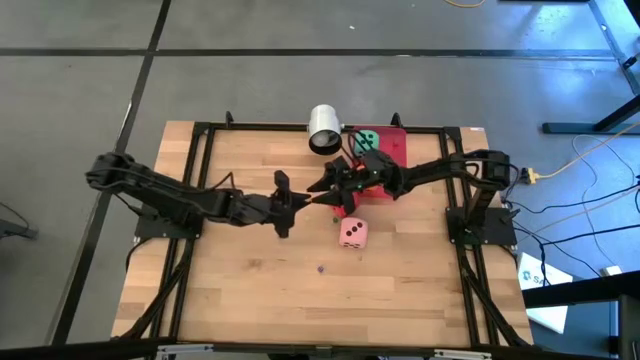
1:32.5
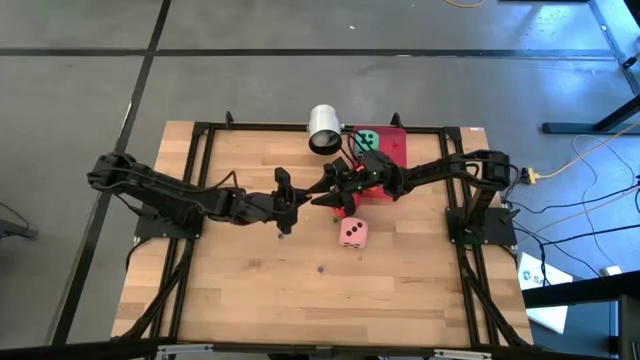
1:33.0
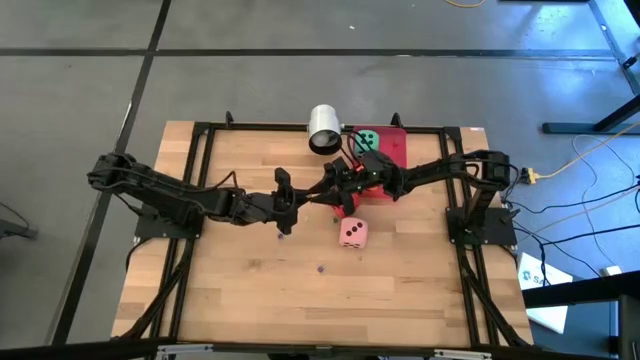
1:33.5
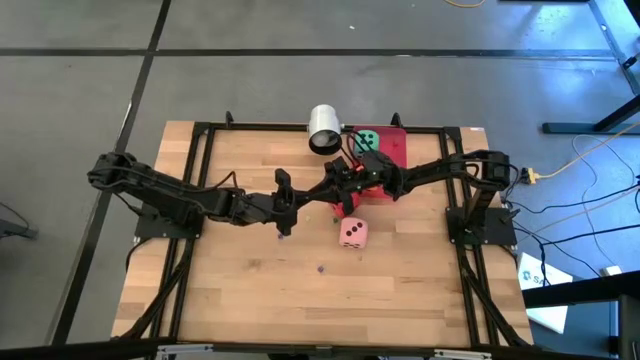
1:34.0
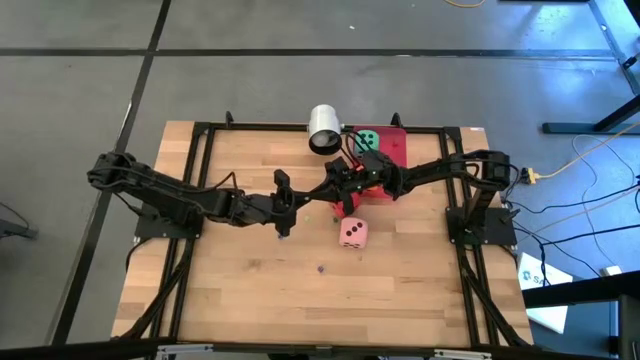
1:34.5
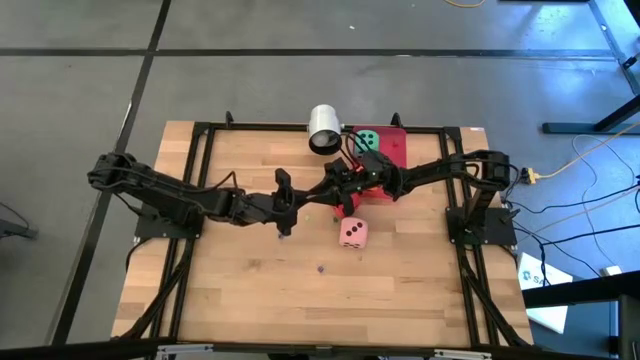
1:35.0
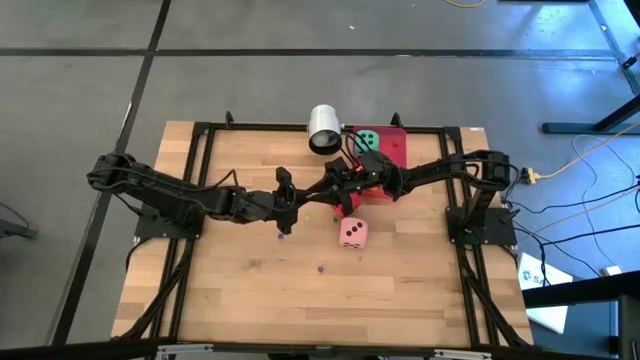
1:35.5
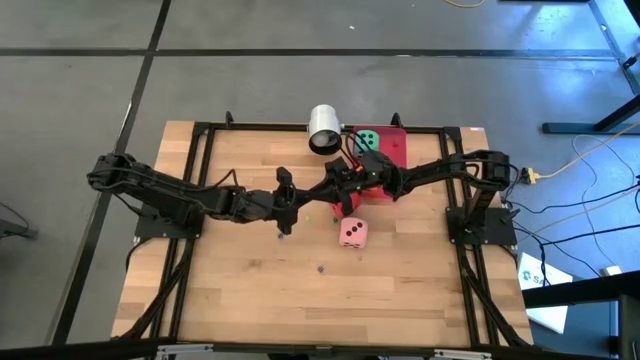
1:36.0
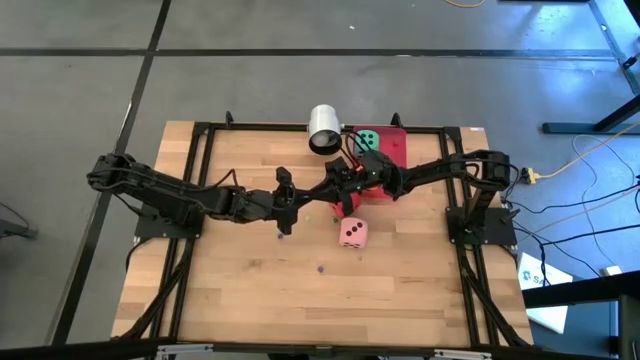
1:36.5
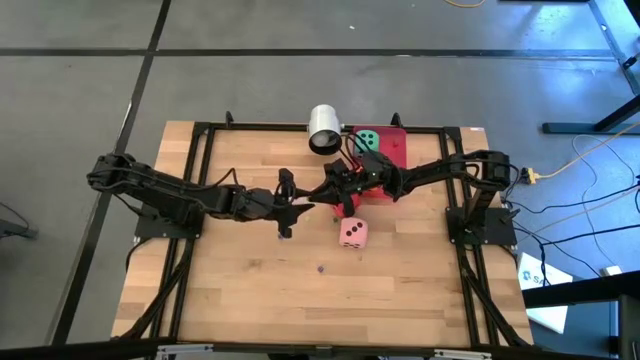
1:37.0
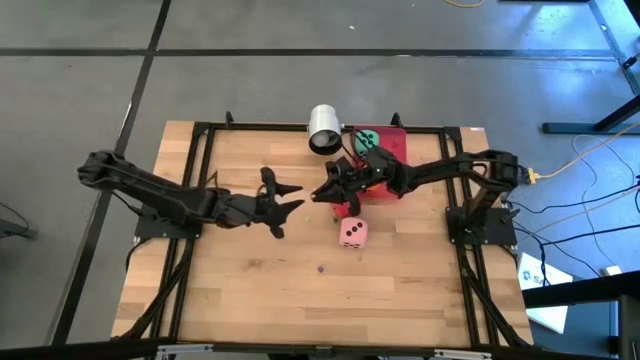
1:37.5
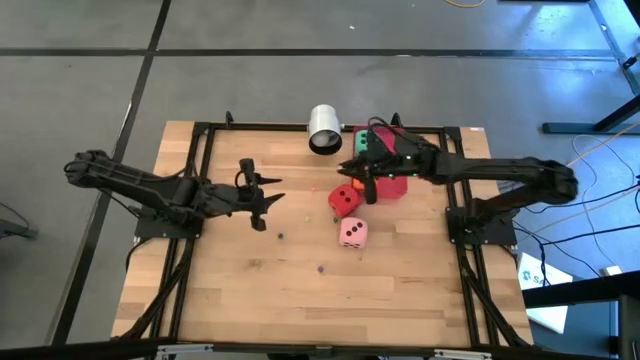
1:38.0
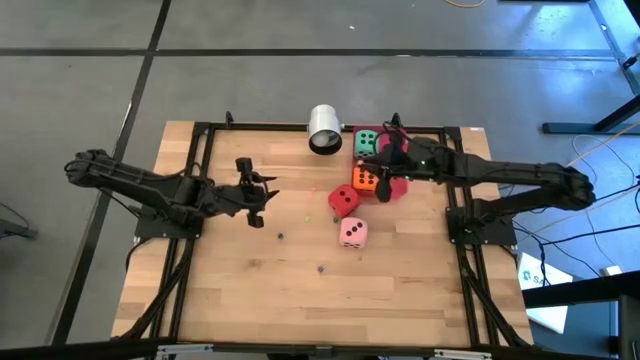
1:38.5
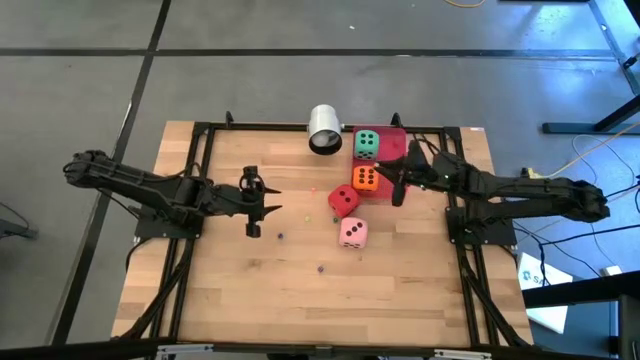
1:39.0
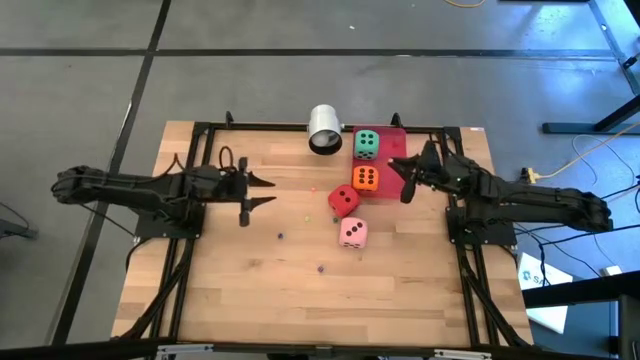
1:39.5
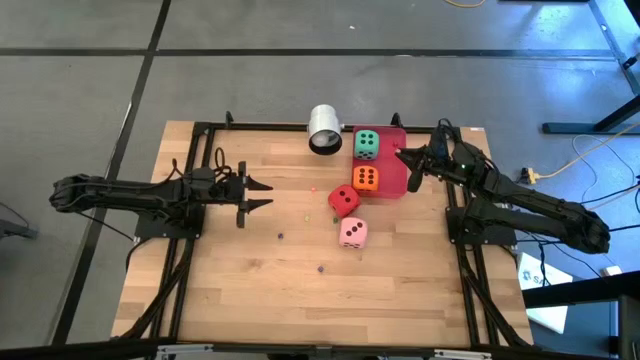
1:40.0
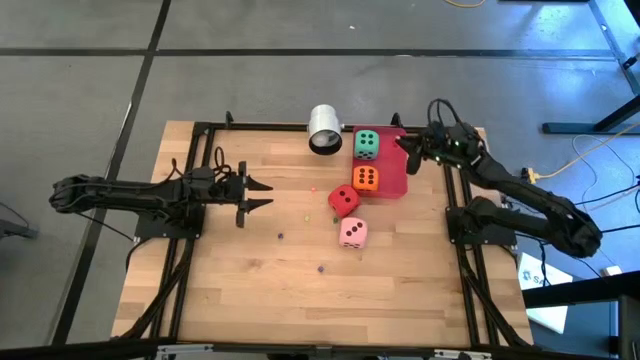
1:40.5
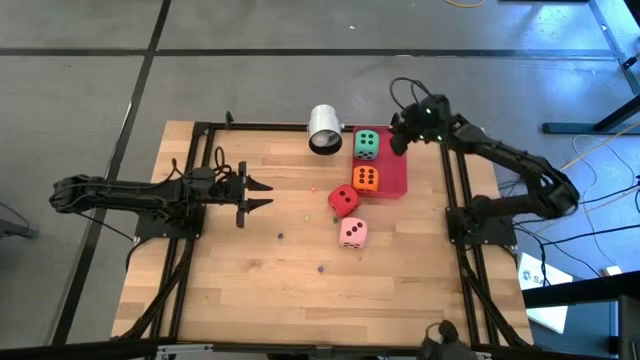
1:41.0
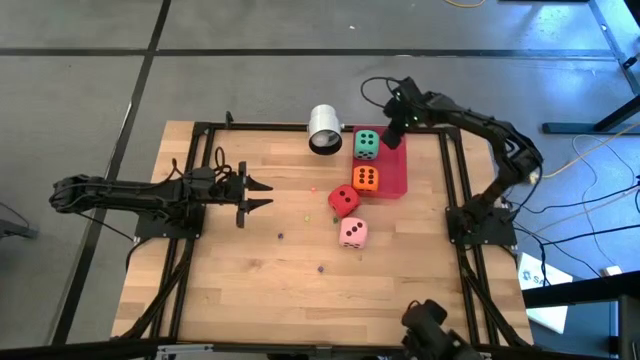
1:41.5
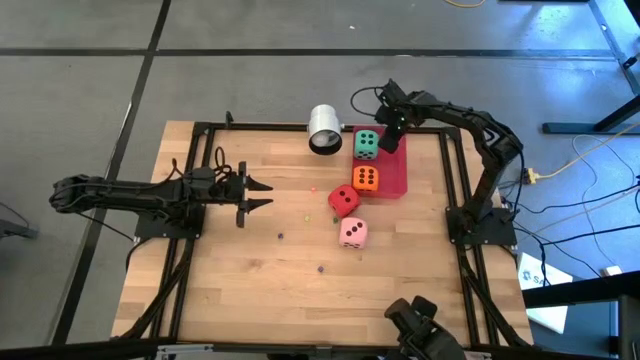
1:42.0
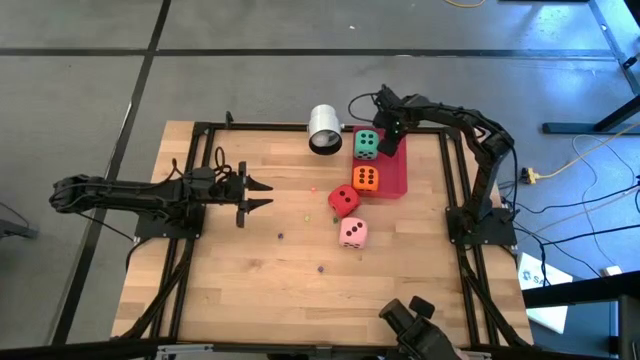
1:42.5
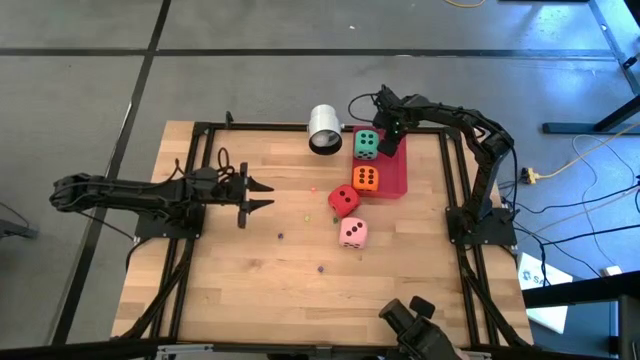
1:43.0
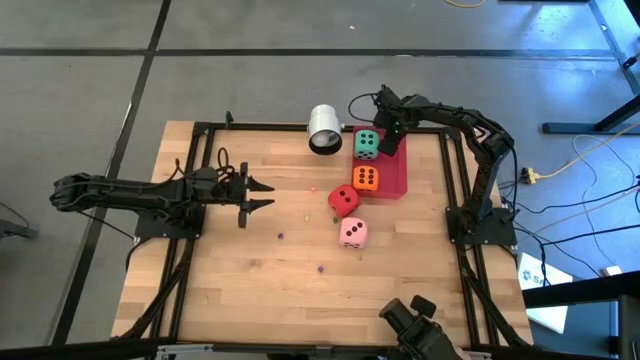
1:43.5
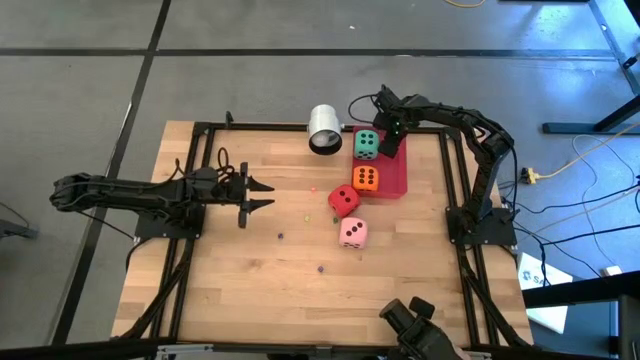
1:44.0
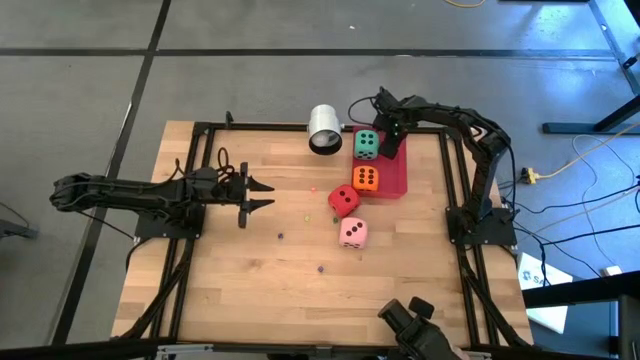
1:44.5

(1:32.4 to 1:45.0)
Task: Pick & Place Dice
Put the small yellow dice into the red bin

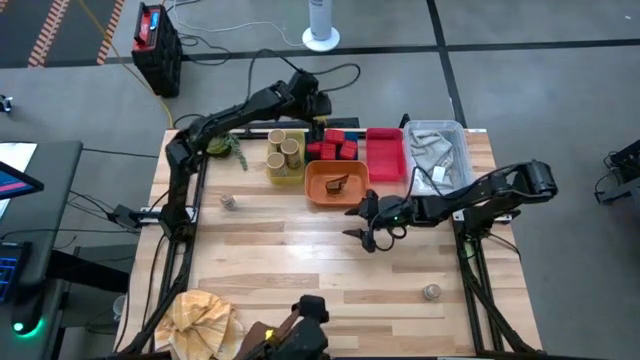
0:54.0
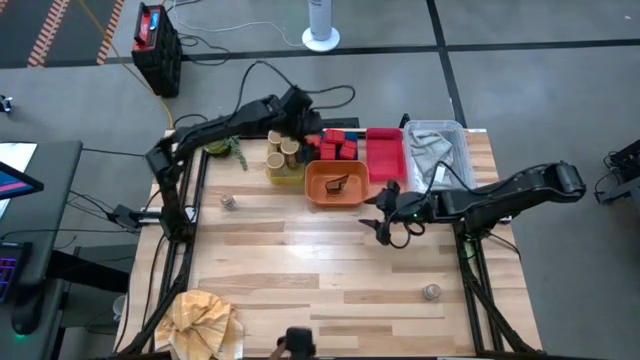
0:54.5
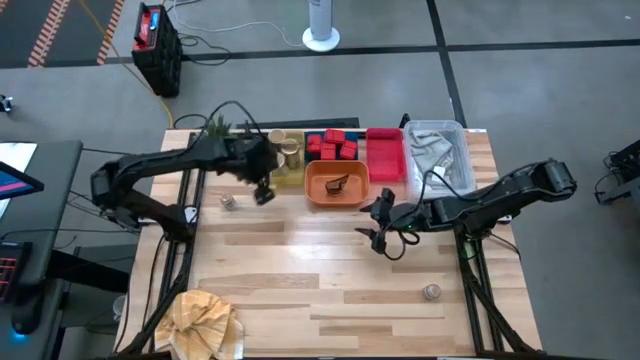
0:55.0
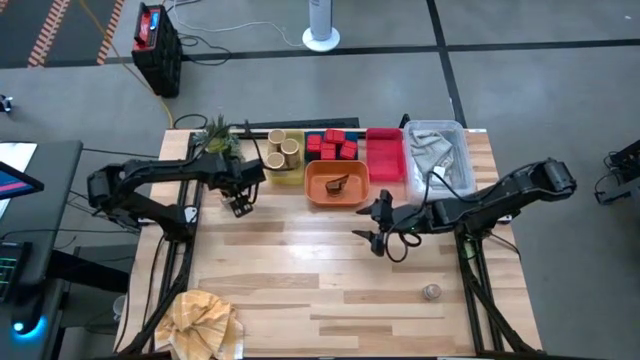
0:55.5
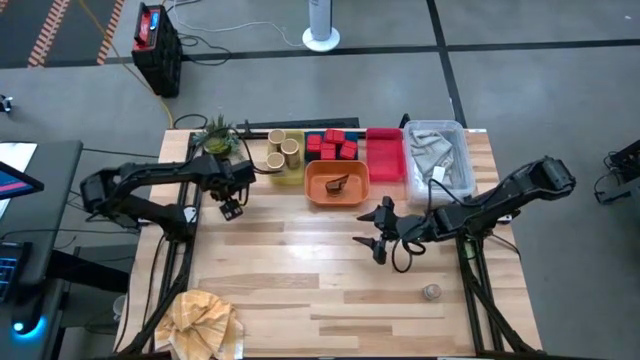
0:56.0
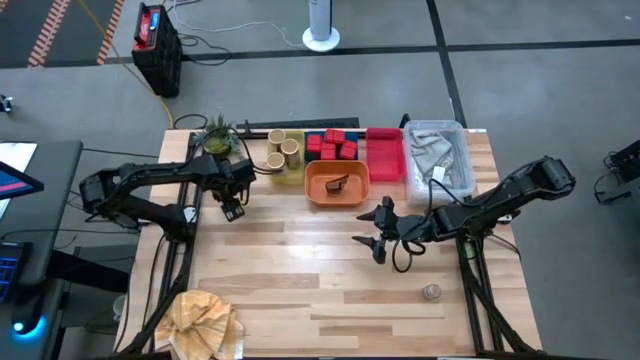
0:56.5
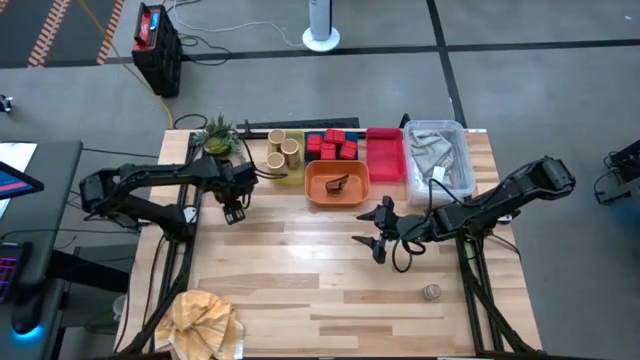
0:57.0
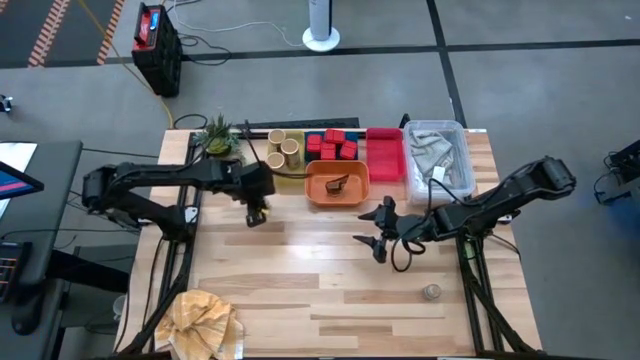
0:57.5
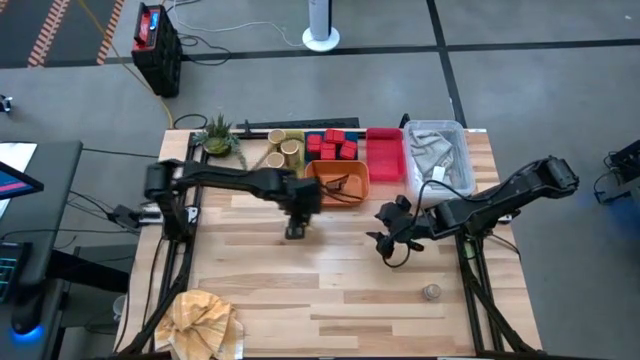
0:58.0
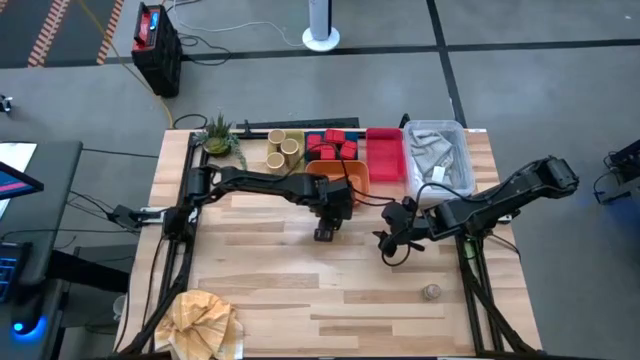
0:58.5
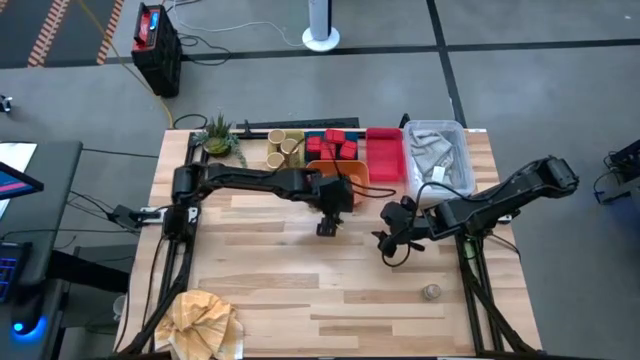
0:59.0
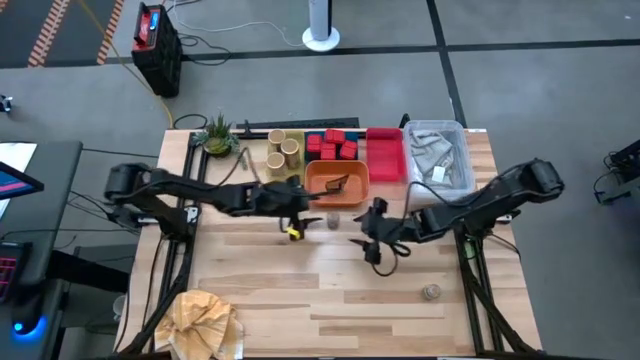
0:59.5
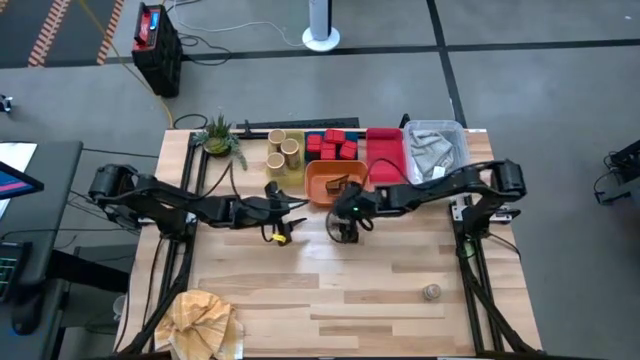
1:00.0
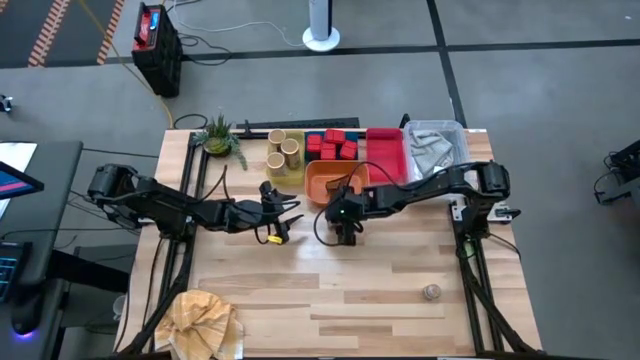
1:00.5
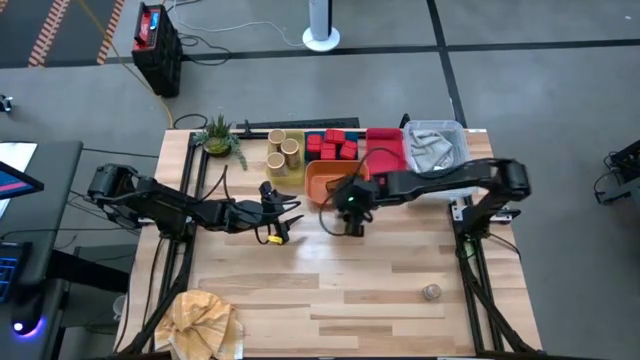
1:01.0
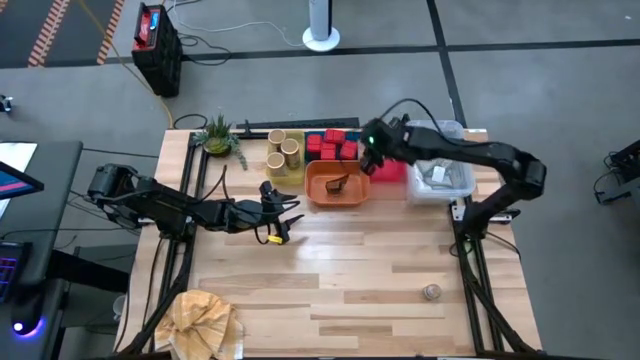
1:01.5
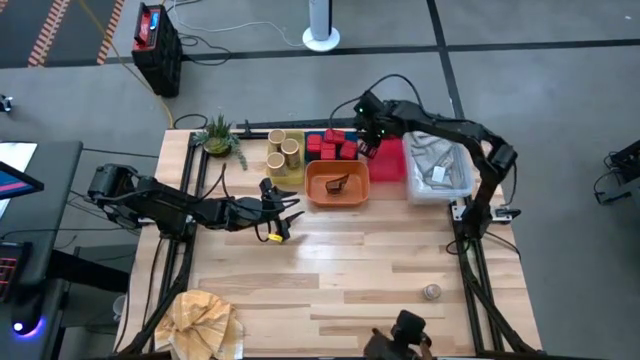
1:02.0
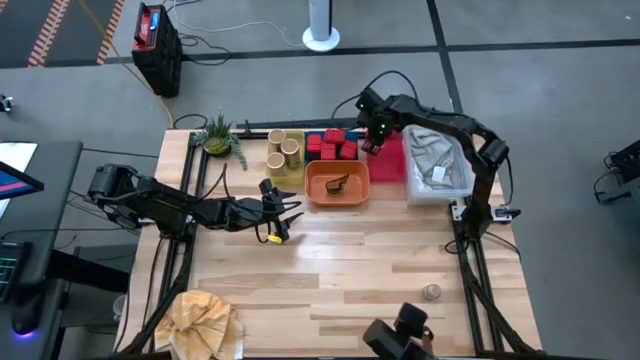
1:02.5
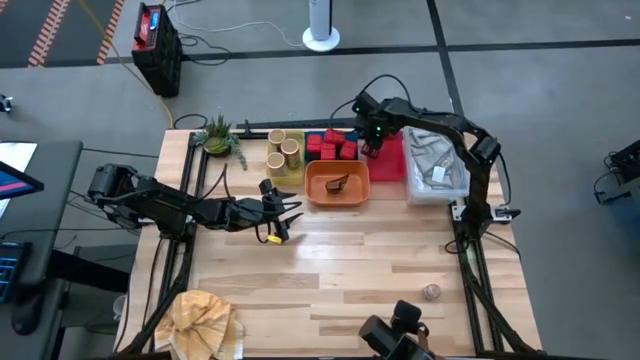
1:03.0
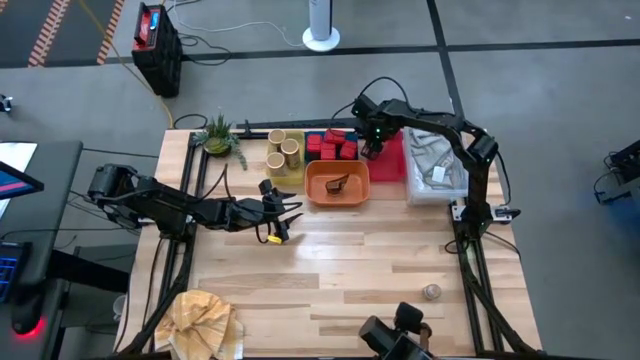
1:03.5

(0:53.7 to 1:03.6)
Task: Sort spices by type
Put the left brown seasoning bottle into the pink bin
